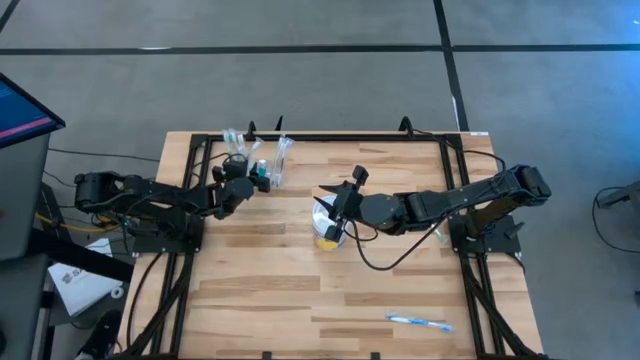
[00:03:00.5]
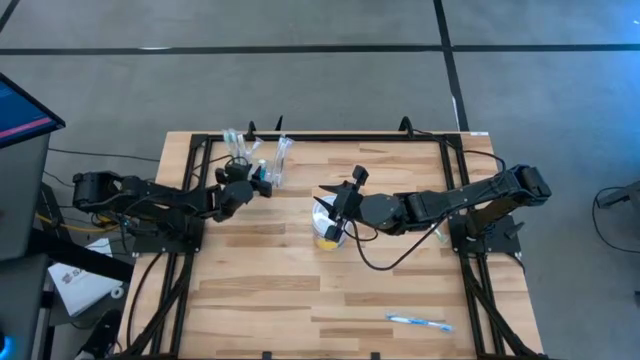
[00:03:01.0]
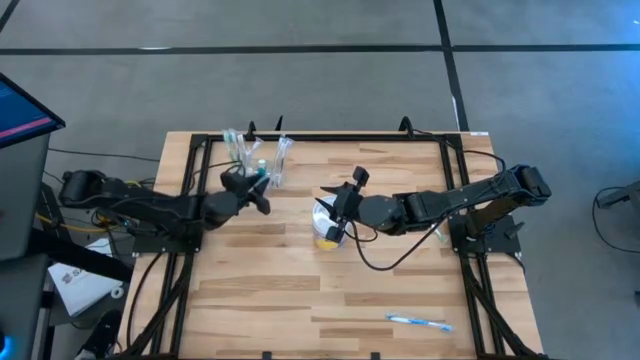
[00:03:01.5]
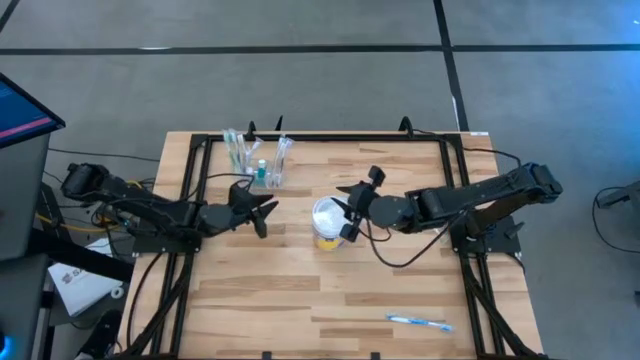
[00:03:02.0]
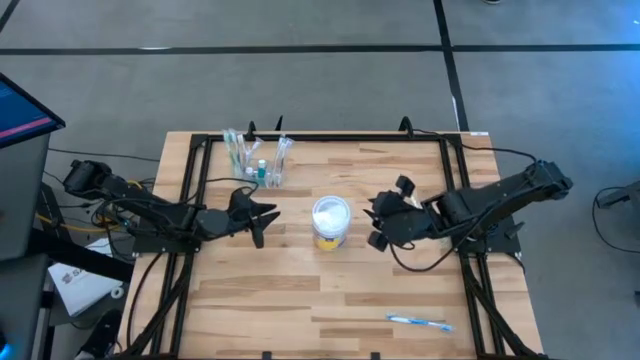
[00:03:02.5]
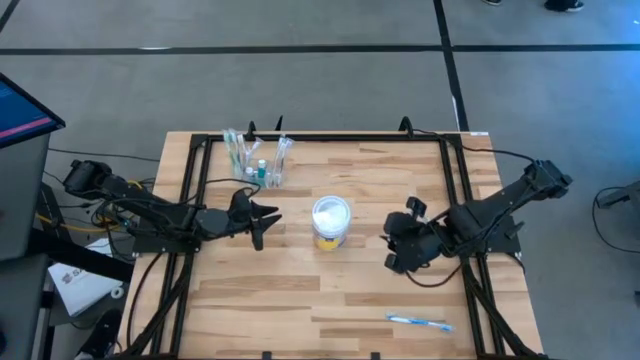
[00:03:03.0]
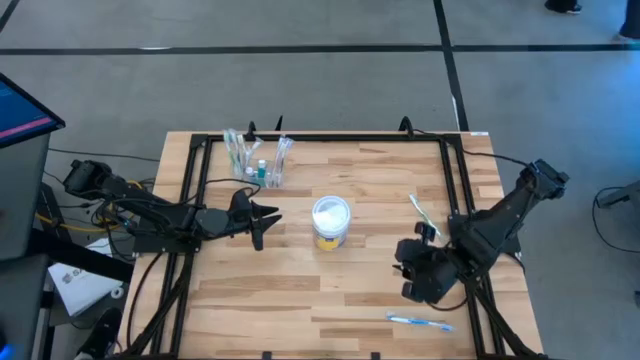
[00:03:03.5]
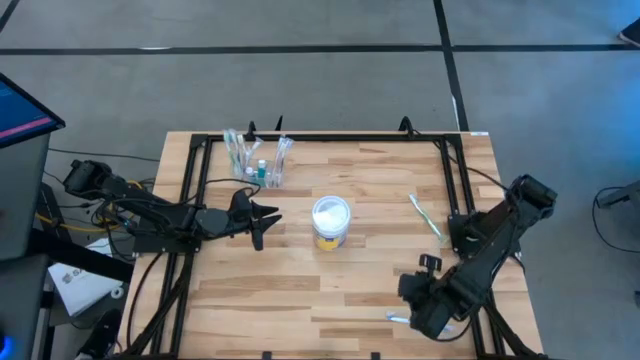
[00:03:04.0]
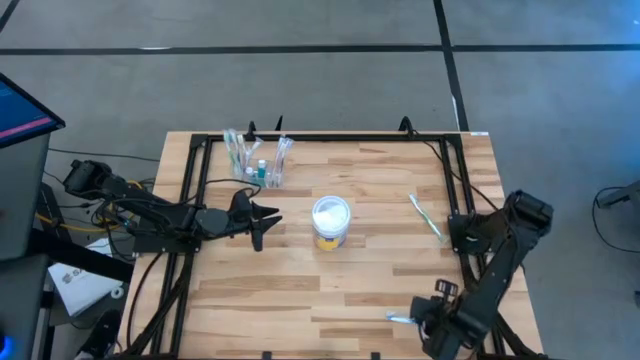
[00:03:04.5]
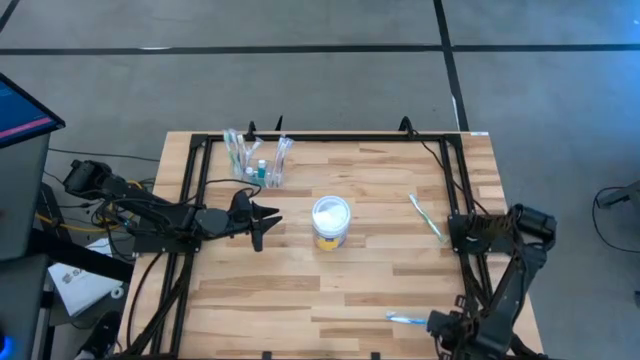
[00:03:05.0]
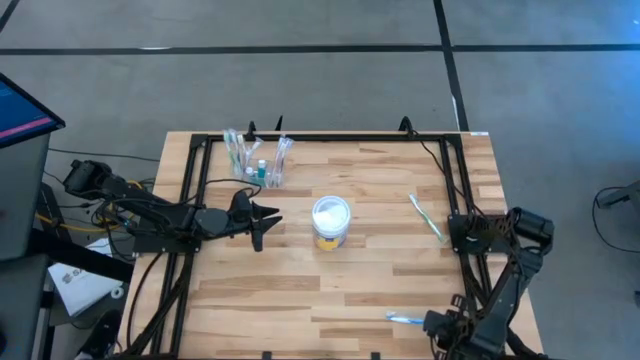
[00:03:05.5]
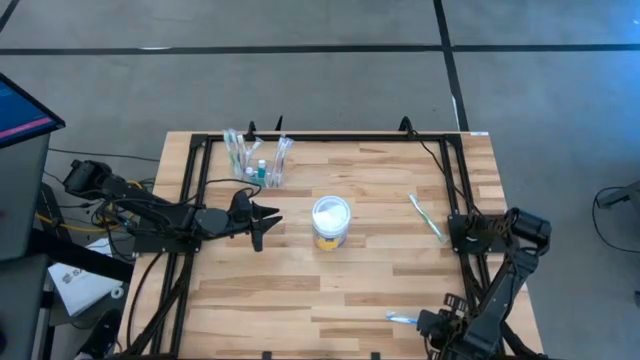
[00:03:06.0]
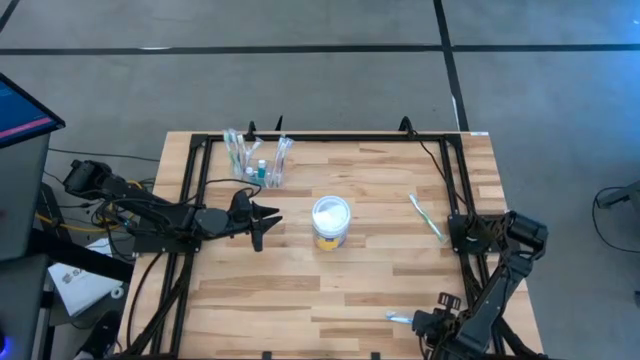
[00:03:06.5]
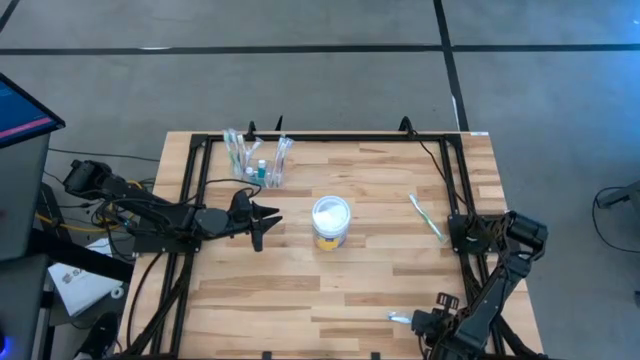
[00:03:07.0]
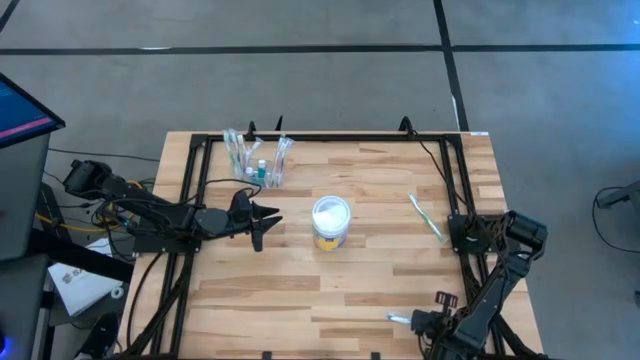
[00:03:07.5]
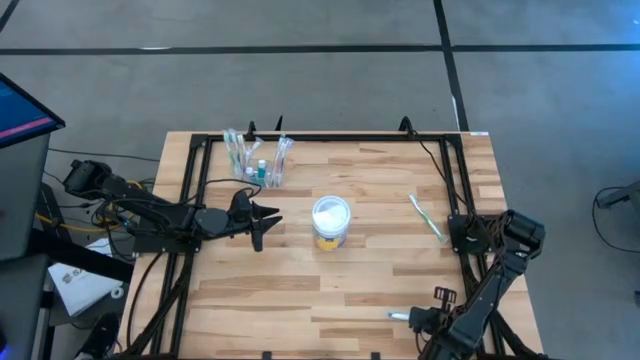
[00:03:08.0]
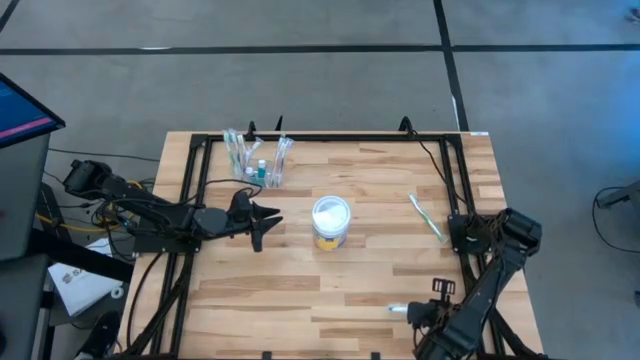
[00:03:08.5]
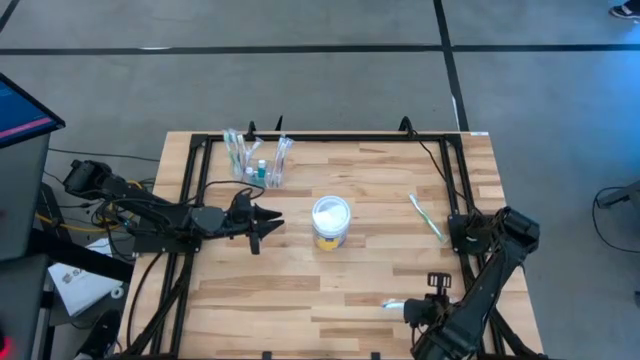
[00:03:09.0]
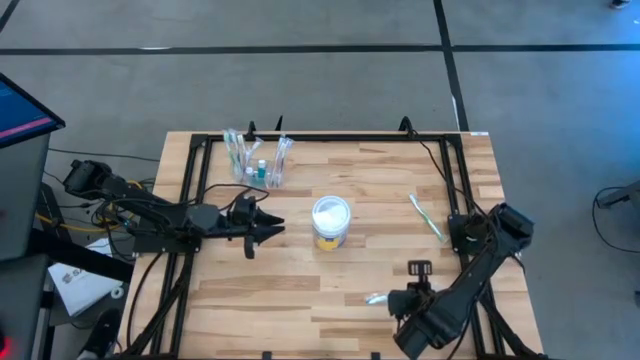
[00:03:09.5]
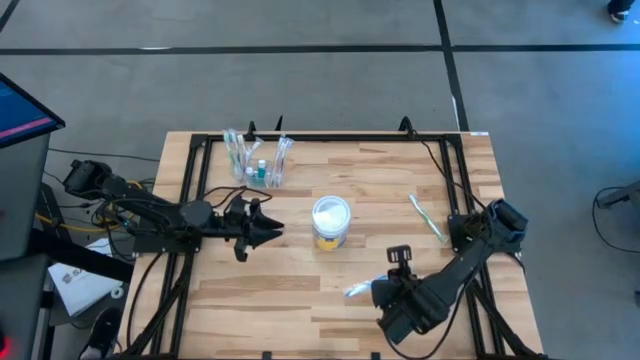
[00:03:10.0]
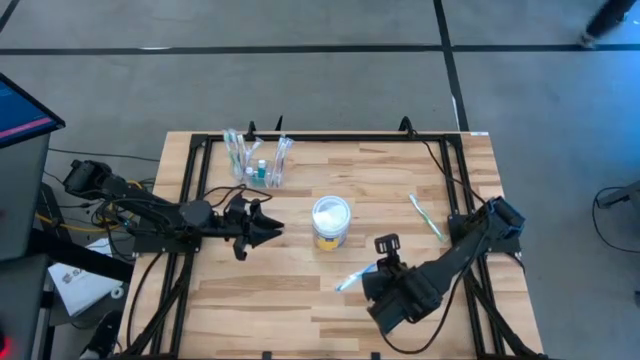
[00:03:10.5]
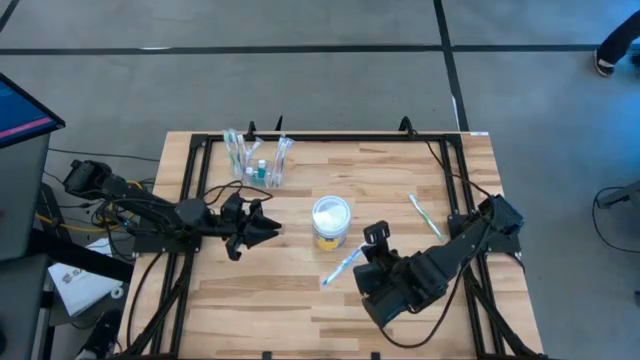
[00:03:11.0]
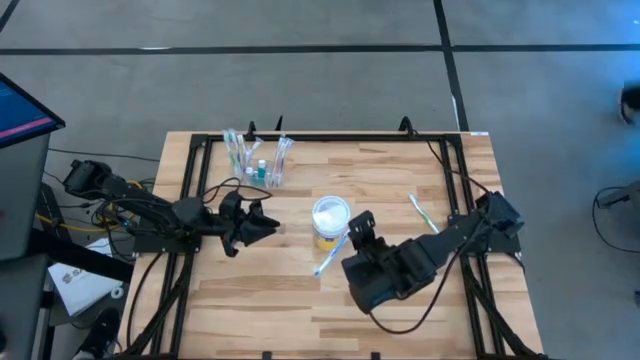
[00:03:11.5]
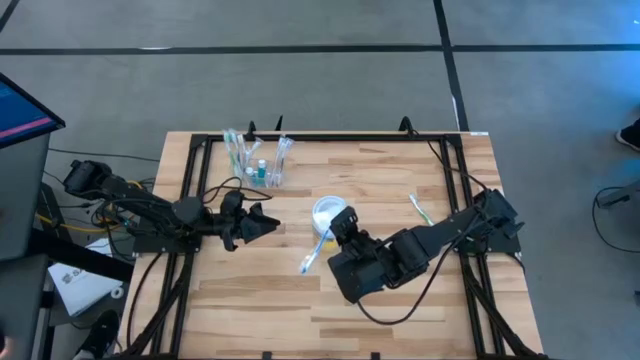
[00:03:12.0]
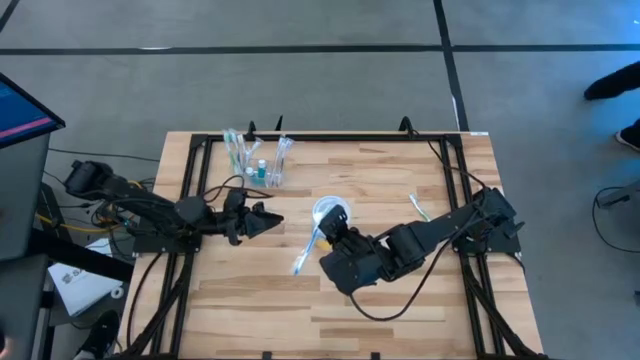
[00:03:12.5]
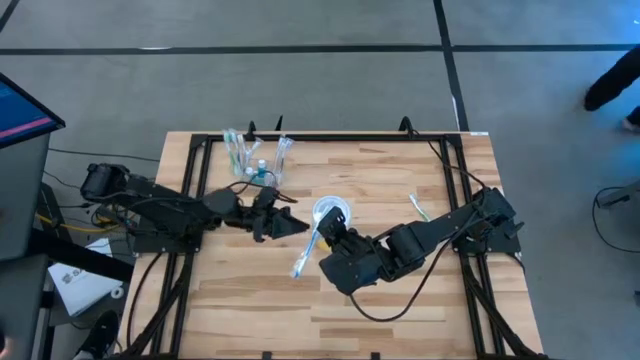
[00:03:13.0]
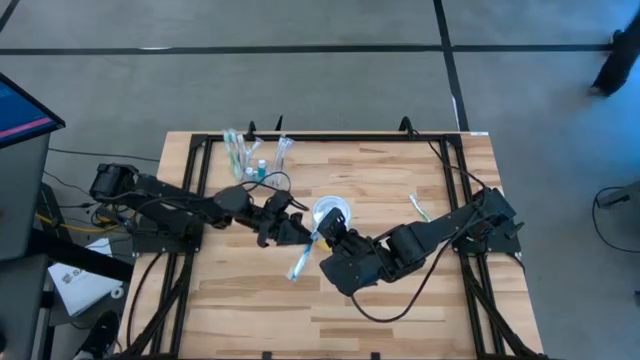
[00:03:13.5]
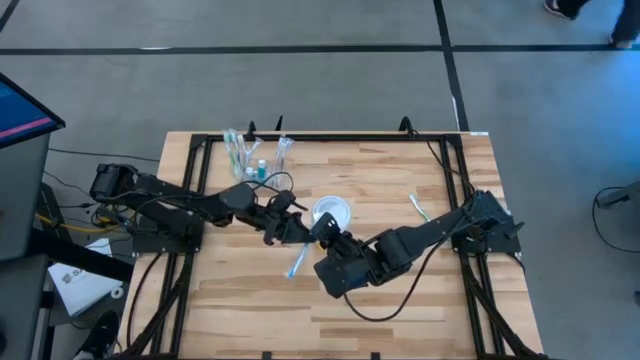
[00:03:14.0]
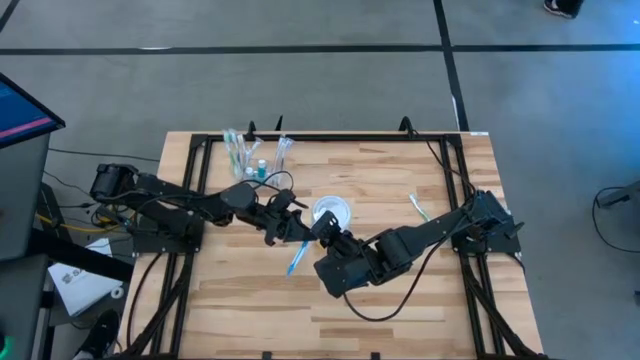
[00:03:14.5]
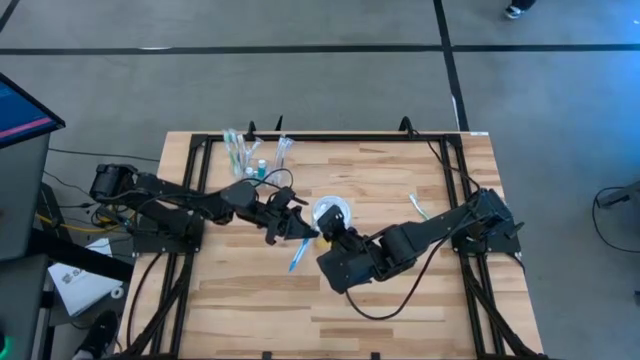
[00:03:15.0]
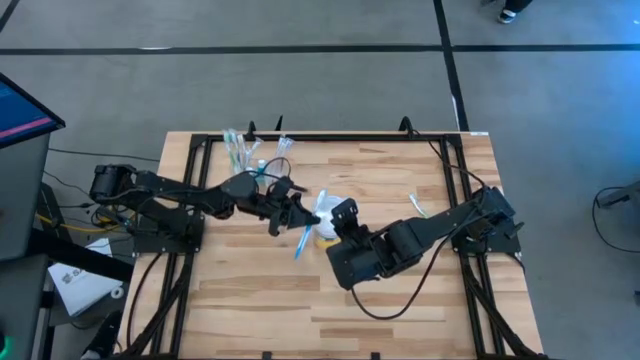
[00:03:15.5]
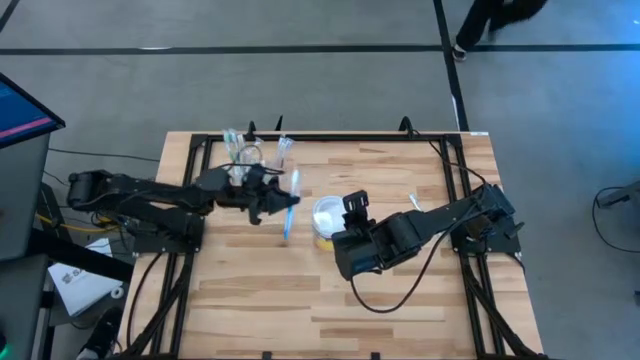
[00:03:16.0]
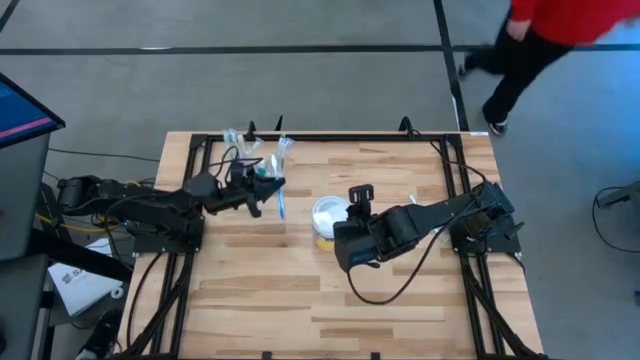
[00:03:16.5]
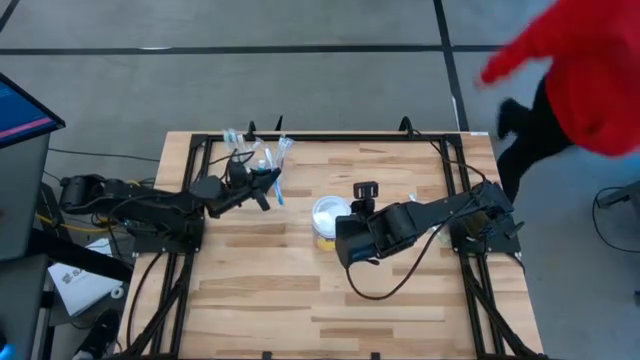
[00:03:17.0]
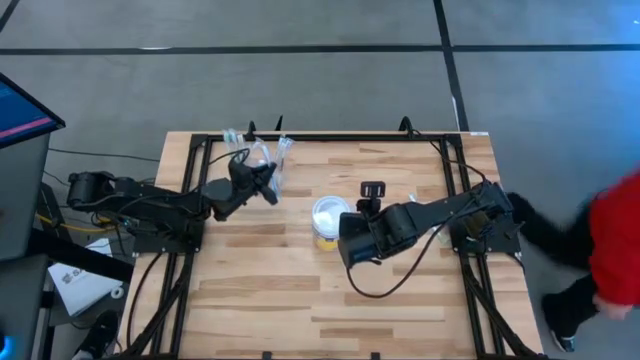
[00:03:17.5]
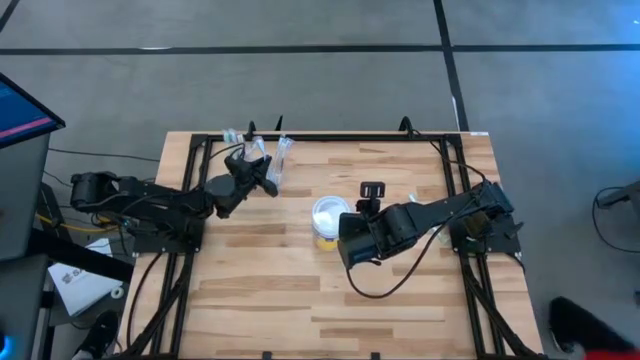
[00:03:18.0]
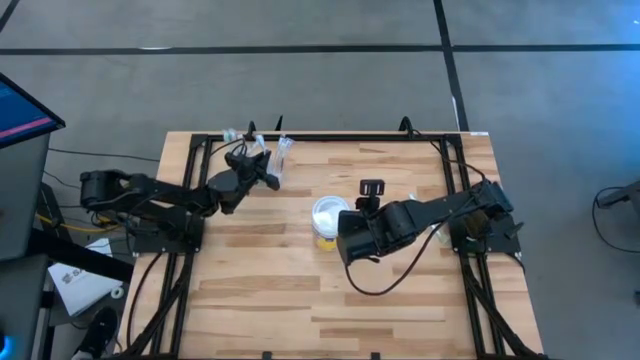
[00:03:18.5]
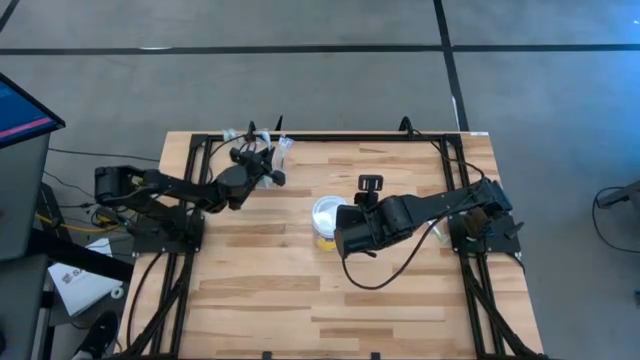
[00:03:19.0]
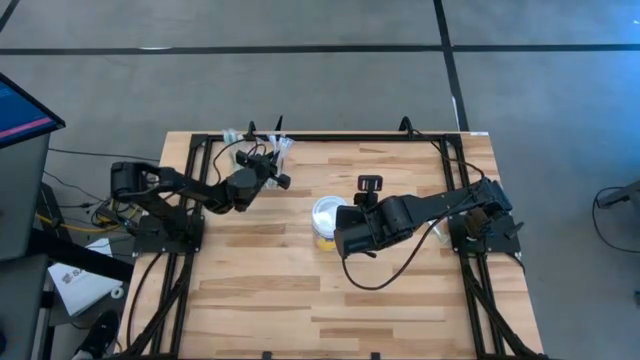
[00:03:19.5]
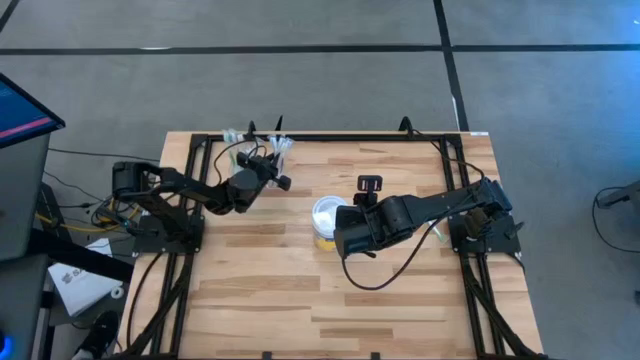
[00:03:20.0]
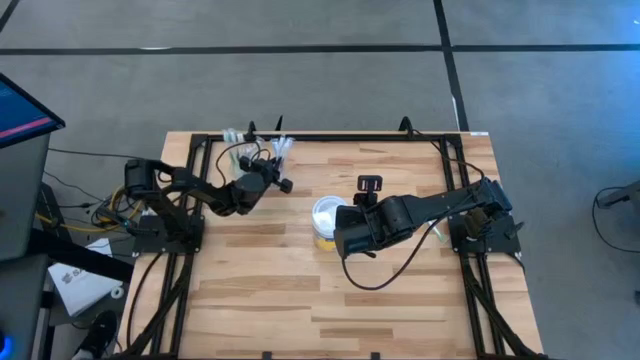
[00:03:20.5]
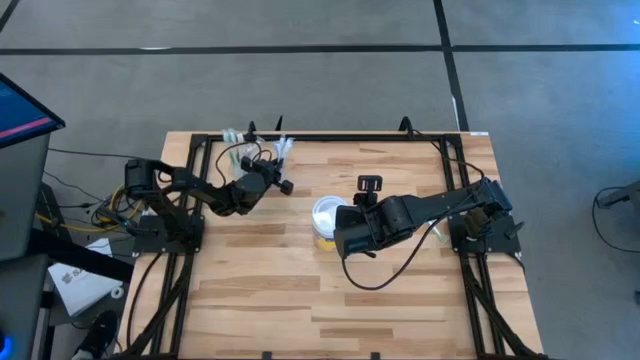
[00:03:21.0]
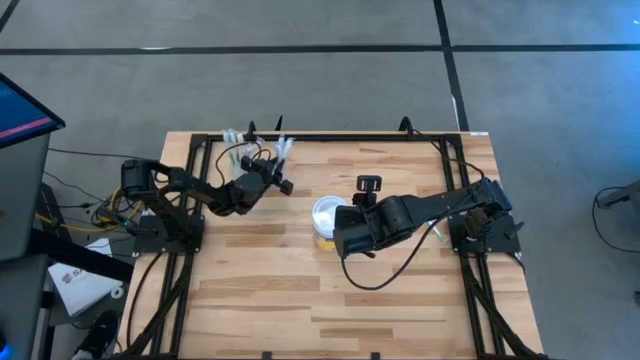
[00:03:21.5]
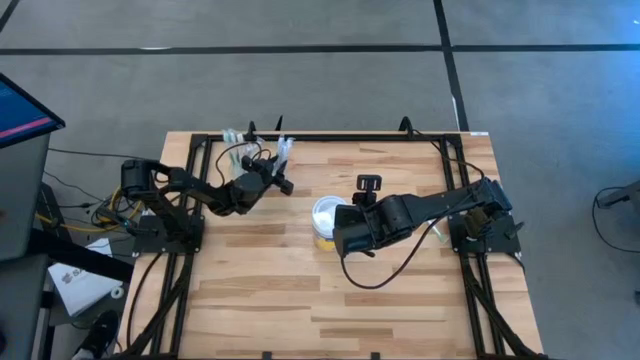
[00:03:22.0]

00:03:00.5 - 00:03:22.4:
Task: Pick & Place toothbrushing station
Put the blue toothbrush into the transparent organizer
